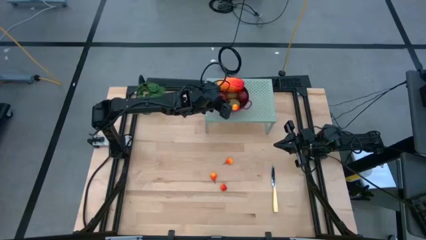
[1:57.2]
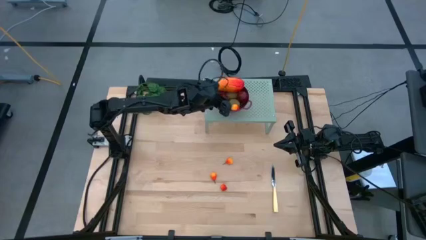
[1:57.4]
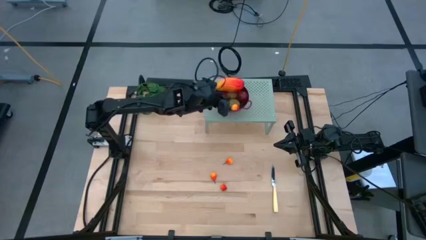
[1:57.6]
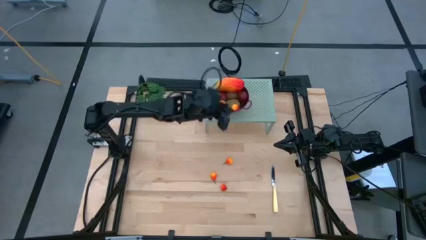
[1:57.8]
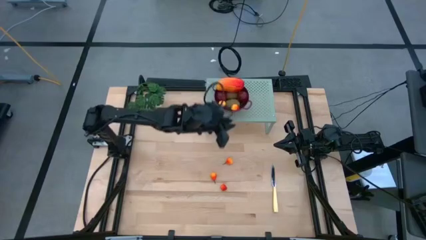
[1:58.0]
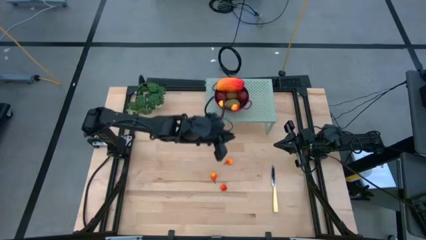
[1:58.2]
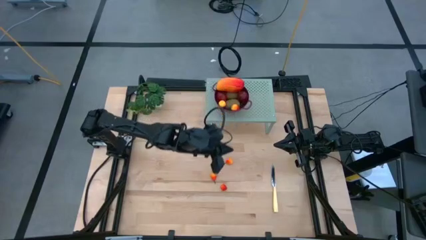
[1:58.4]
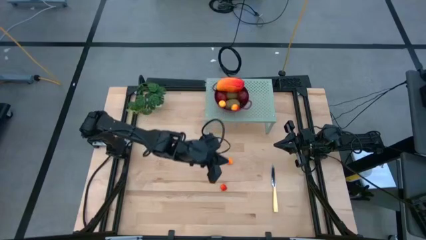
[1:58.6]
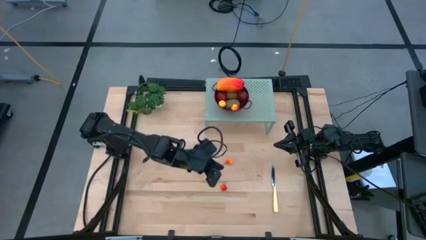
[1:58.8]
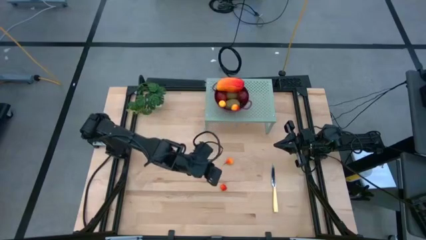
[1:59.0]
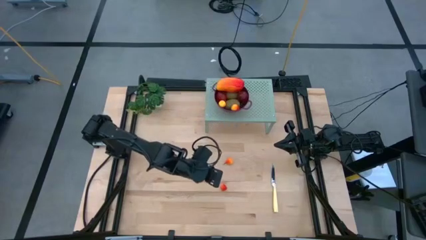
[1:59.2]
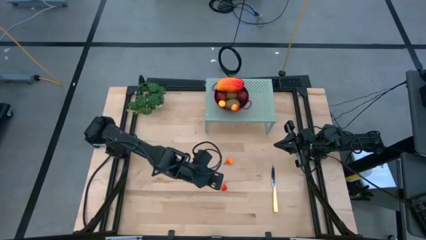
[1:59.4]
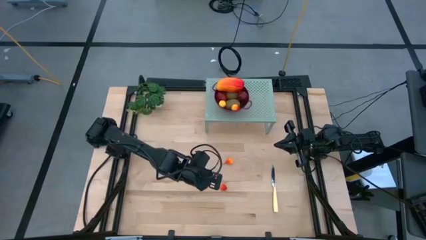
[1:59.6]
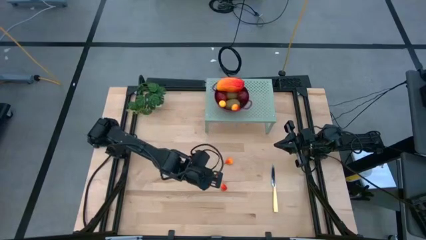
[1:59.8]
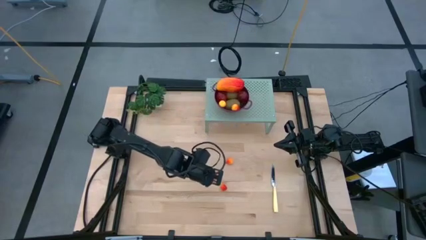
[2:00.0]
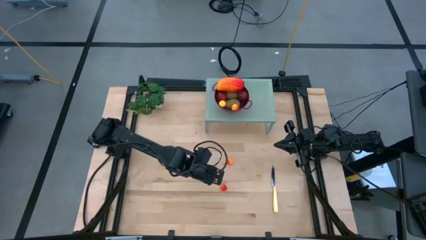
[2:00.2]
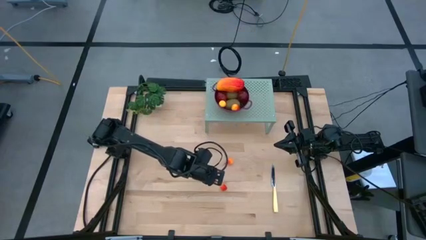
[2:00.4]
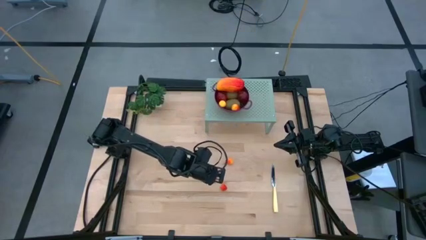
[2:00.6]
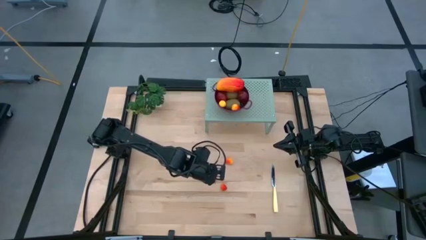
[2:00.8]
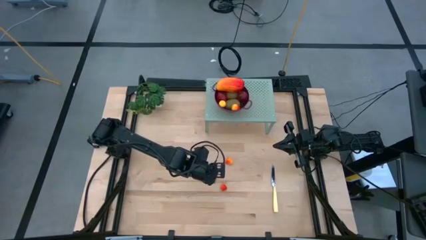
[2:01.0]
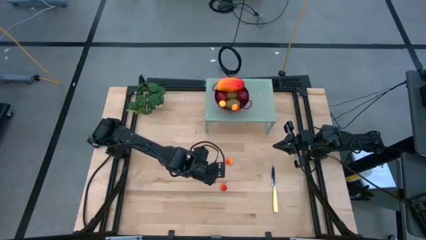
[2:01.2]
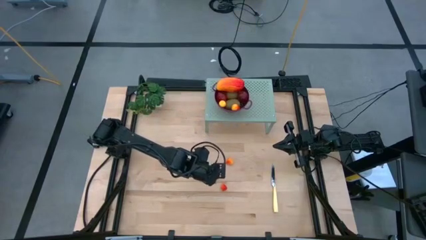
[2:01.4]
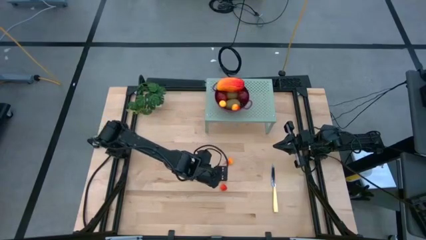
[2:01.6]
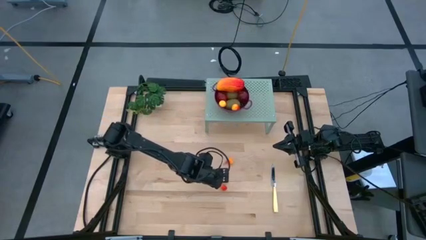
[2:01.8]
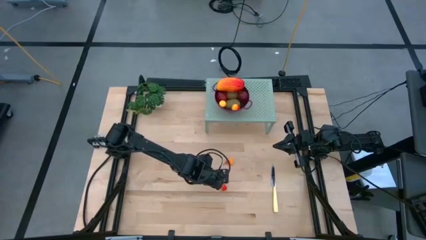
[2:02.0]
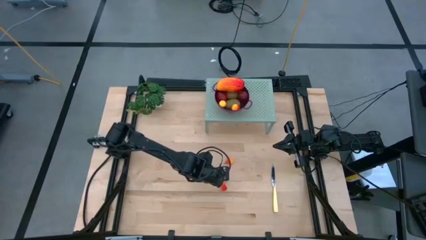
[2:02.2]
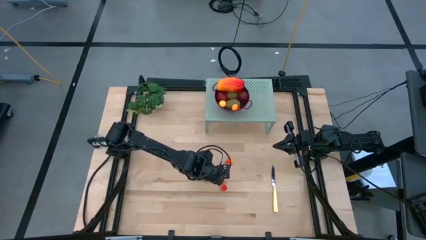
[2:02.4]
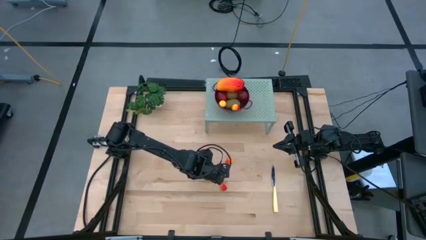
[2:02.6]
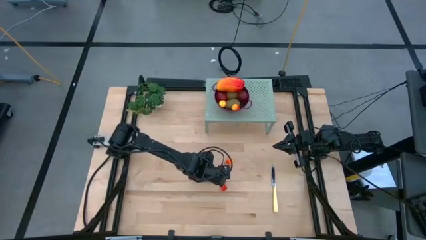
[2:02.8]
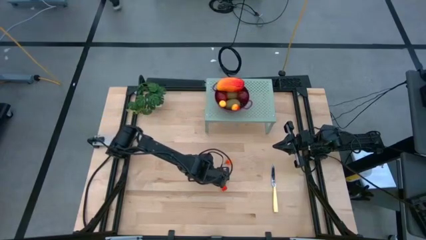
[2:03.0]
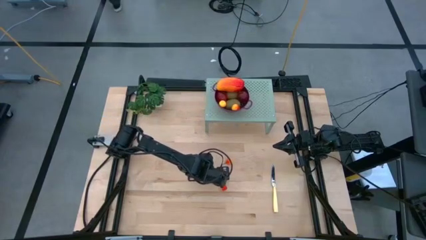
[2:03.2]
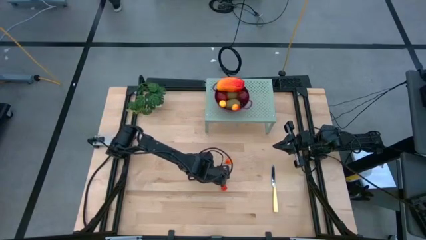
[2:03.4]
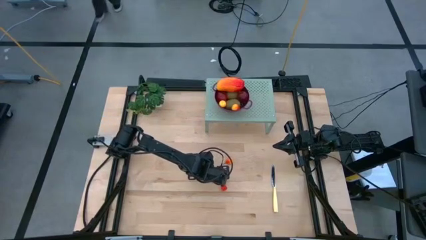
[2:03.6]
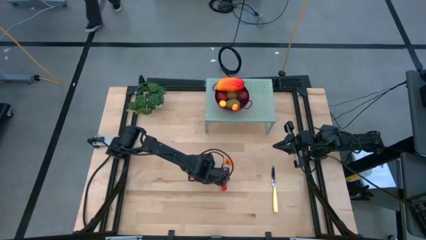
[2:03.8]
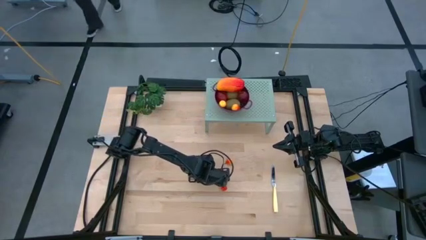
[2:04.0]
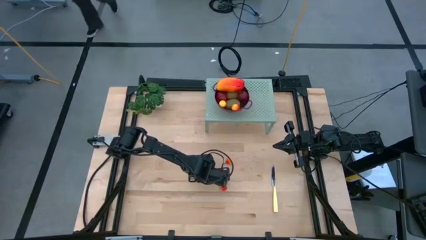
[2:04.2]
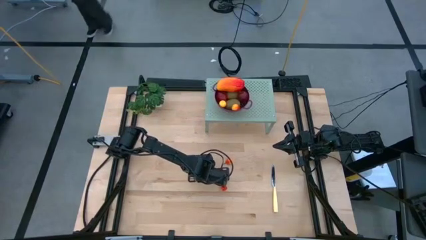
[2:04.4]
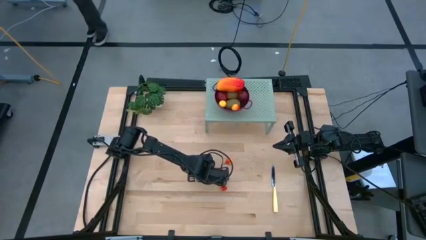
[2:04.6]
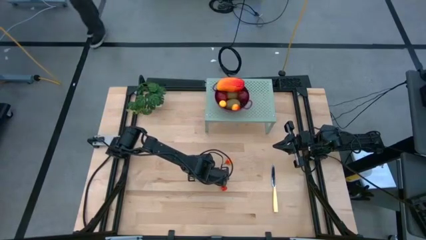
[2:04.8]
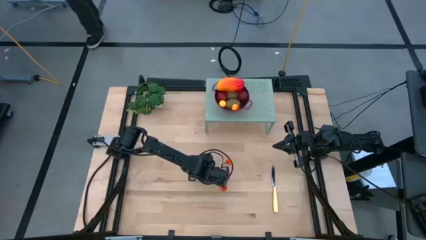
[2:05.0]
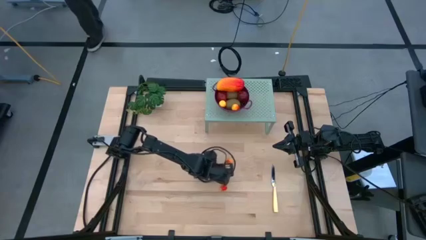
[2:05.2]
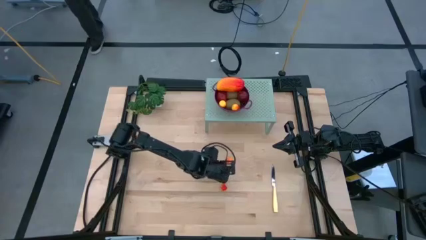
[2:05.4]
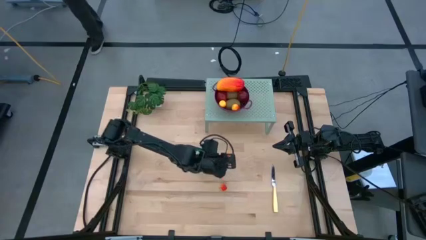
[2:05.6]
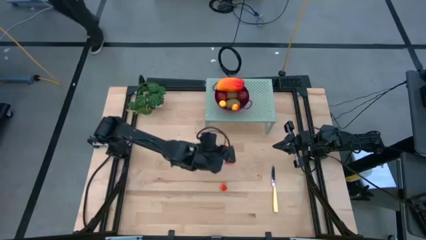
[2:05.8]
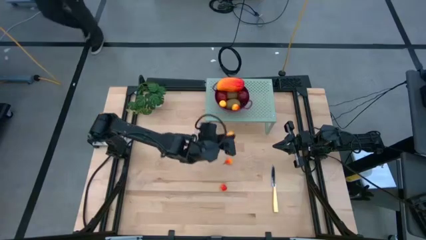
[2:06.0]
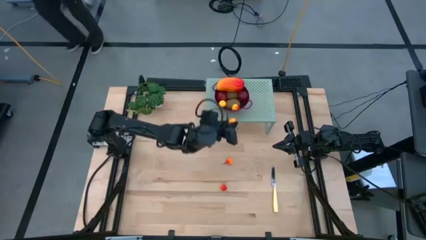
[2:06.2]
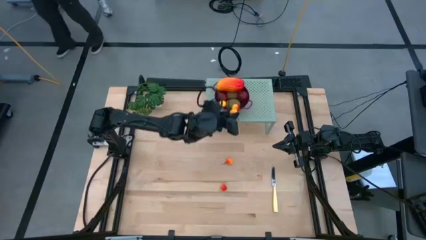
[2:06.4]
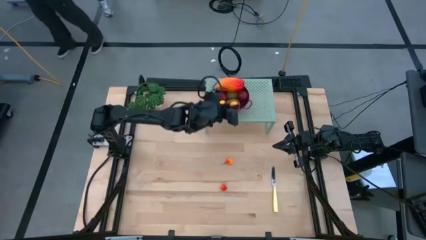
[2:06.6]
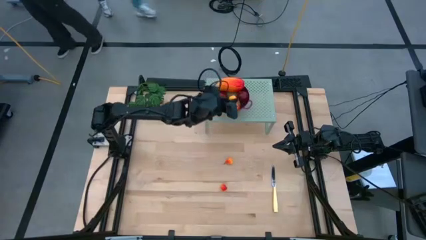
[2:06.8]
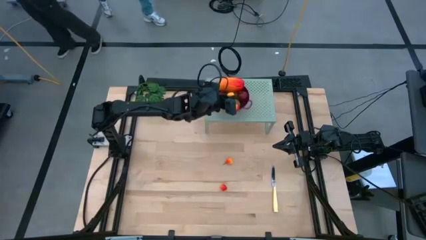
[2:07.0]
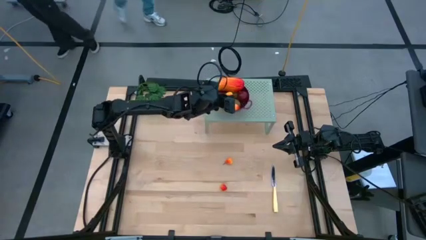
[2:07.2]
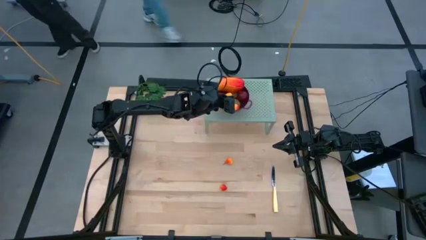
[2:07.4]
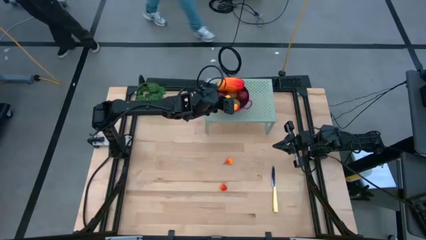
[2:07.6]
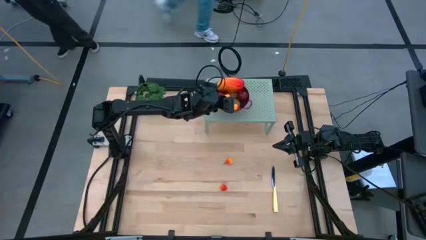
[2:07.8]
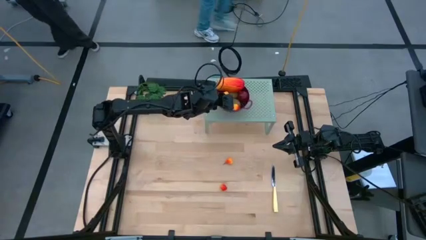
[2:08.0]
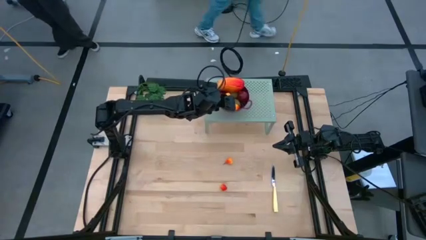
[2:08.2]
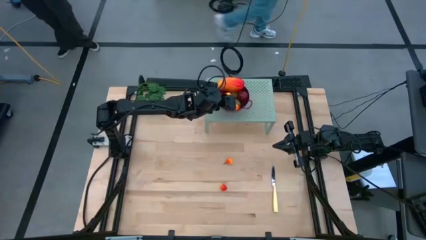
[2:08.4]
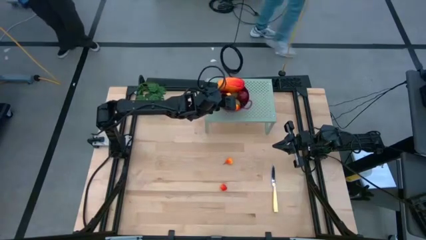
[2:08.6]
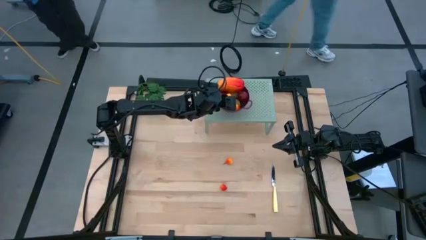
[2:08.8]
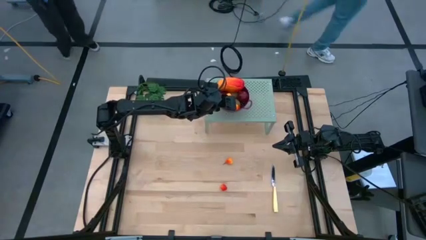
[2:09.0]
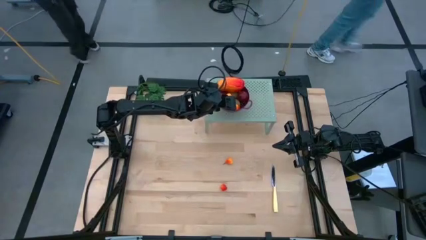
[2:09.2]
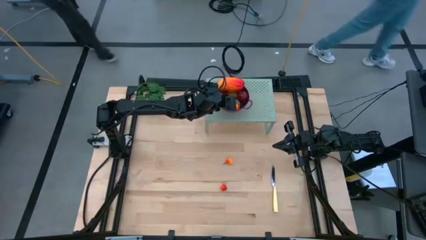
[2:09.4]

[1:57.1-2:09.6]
Task: Pick & Place Fruit
Put the pear into the strainer bowl on the shelf

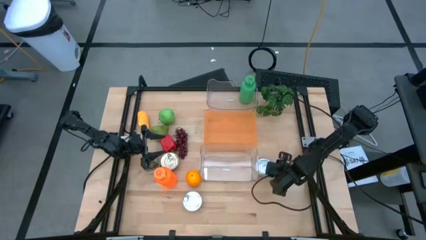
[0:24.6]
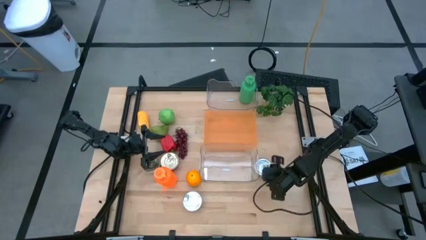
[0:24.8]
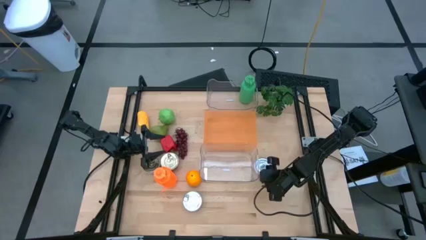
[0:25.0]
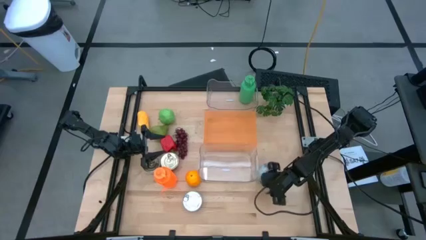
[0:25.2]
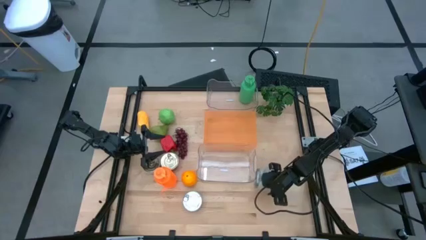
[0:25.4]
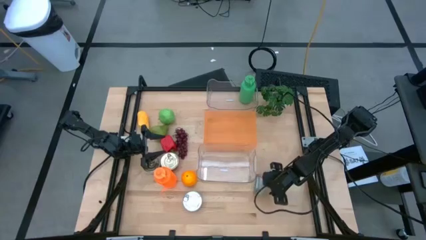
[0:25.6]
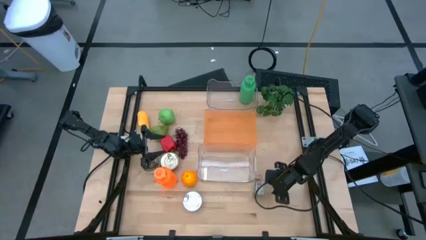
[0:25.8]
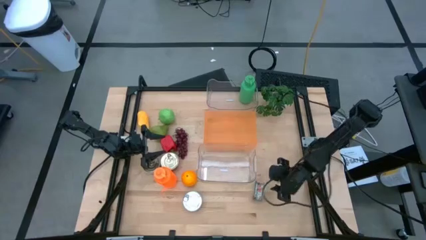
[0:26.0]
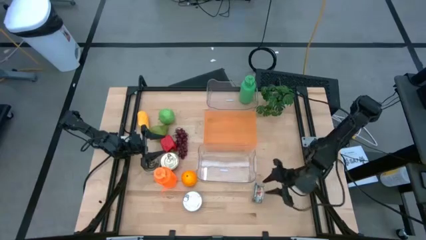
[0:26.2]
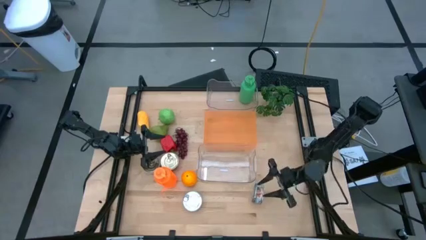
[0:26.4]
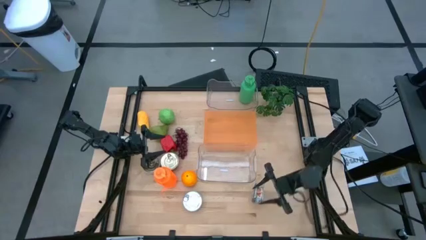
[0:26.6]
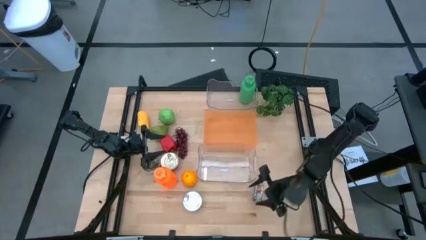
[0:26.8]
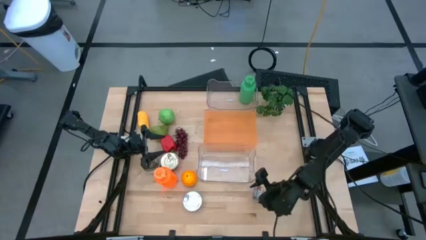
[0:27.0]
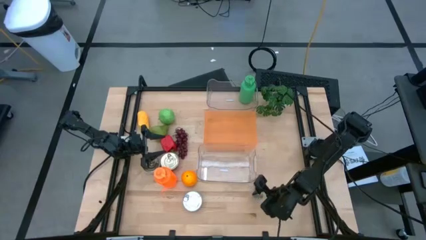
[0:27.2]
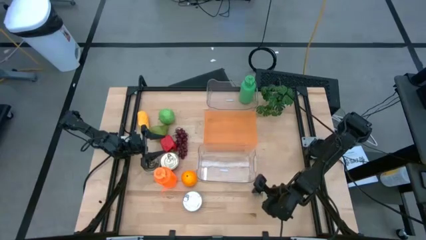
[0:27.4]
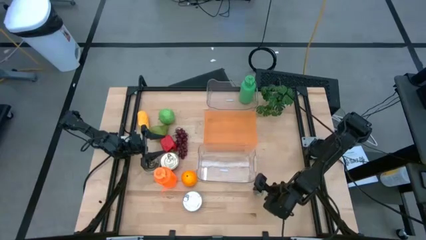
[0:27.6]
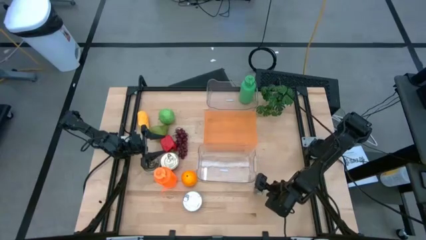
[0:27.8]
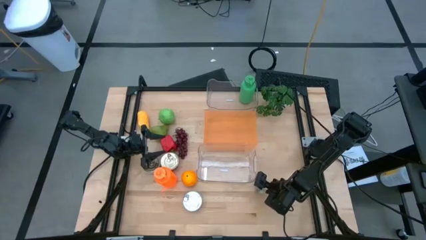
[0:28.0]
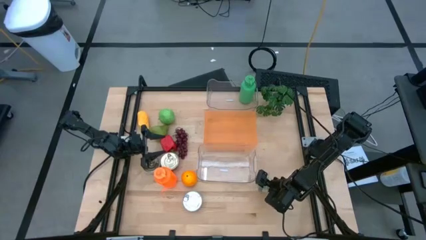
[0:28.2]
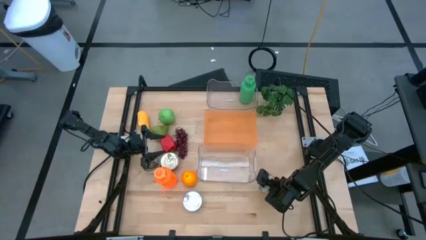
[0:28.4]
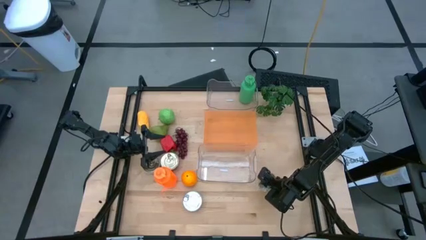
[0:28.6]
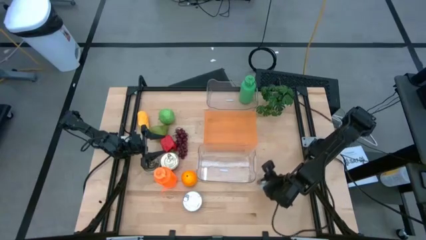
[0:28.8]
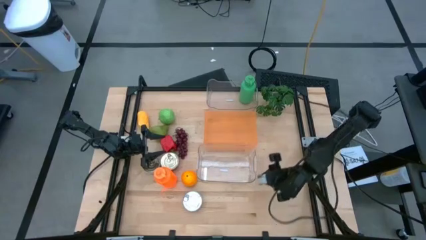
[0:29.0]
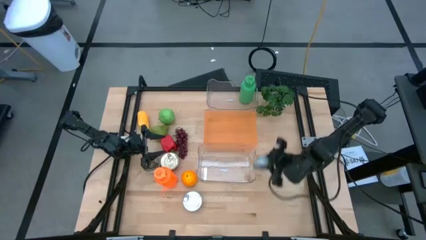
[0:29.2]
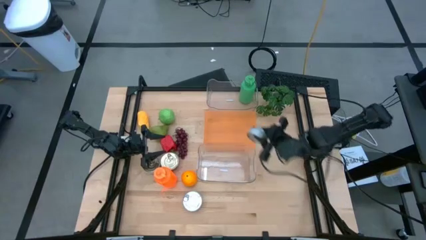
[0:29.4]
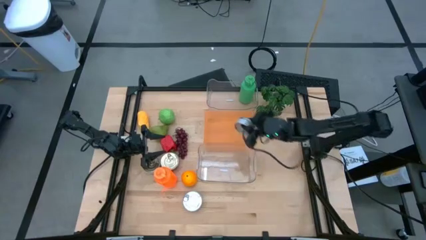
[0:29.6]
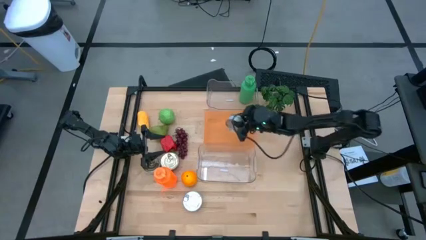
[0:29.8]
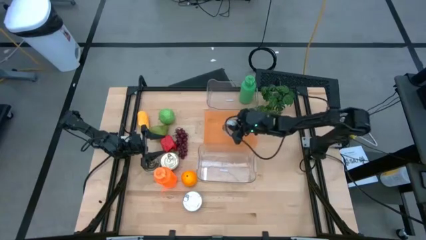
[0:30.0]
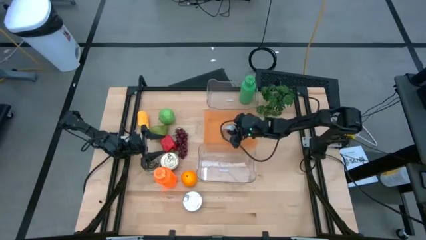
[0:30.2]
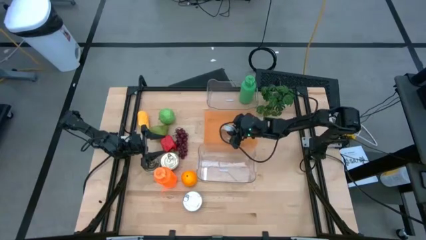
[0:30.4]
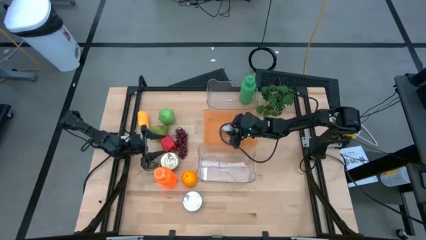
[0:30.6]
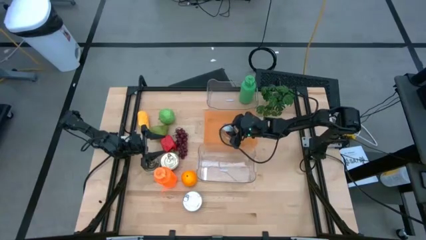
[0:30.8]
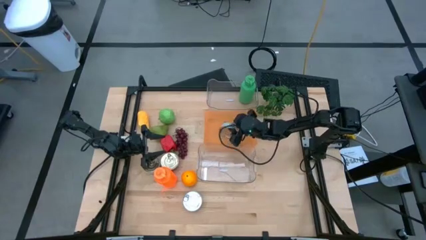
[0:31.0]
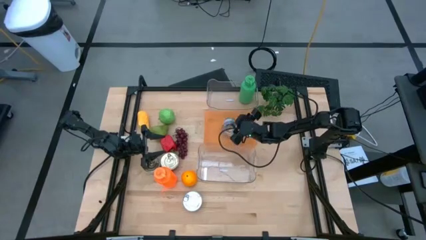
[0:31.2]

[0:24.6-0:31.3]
Task: Pick & Place Food Item
Put the right green tuna can into the orange bin
